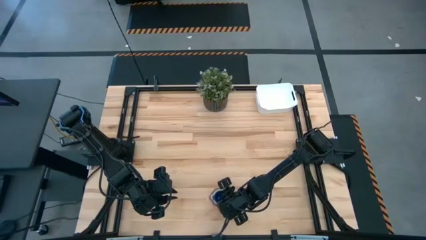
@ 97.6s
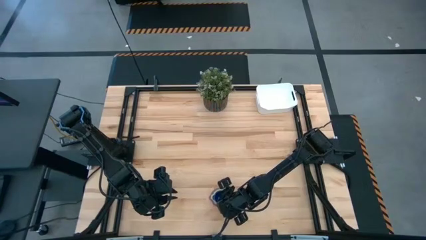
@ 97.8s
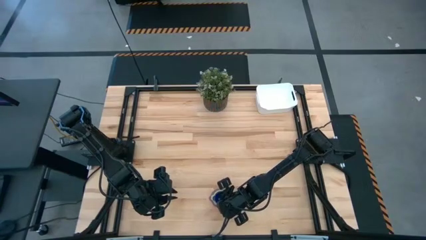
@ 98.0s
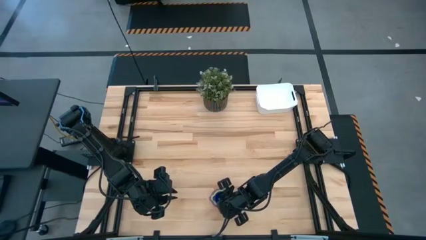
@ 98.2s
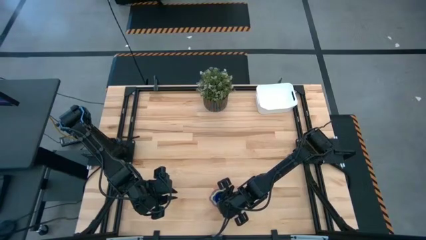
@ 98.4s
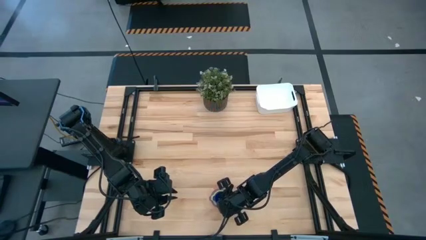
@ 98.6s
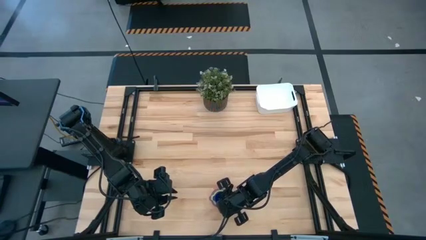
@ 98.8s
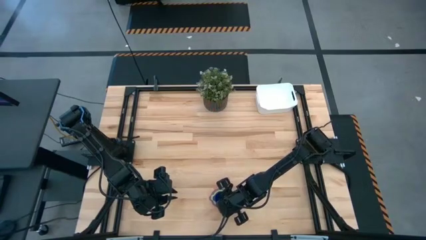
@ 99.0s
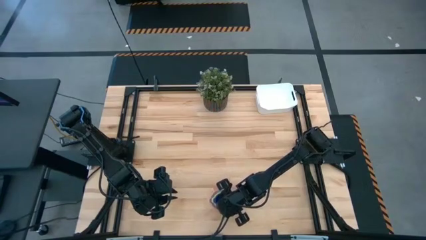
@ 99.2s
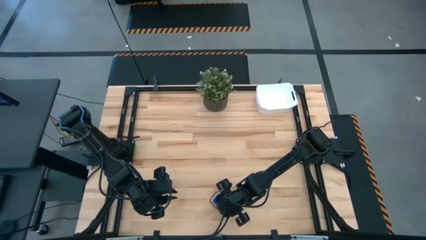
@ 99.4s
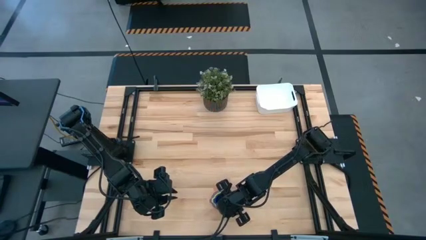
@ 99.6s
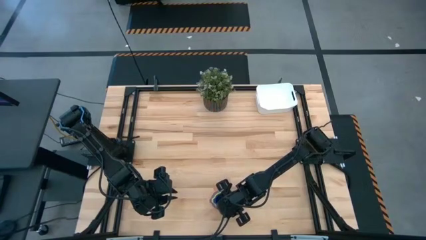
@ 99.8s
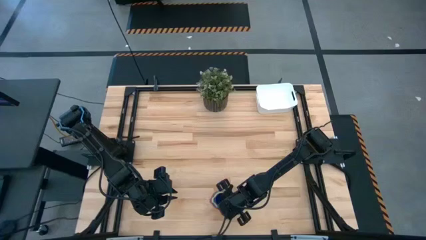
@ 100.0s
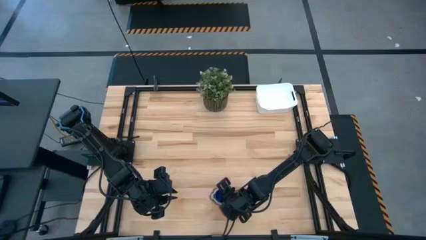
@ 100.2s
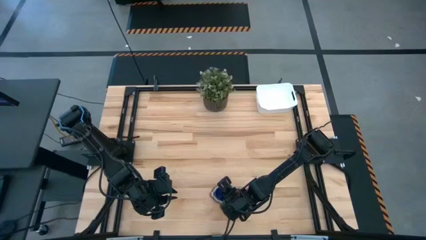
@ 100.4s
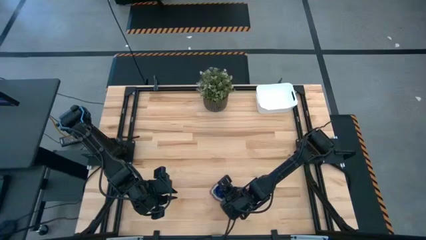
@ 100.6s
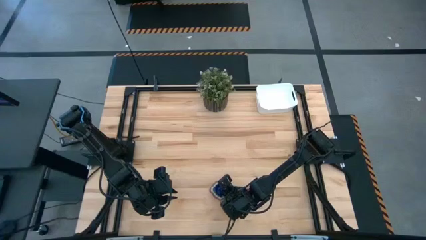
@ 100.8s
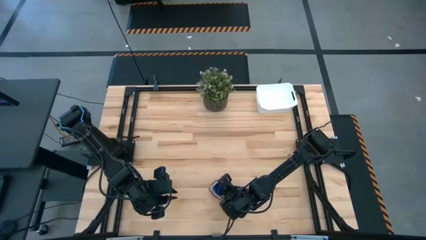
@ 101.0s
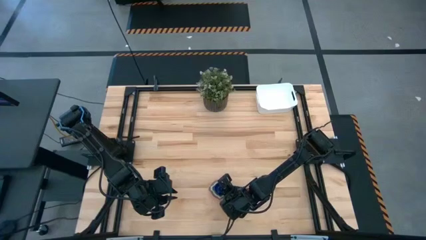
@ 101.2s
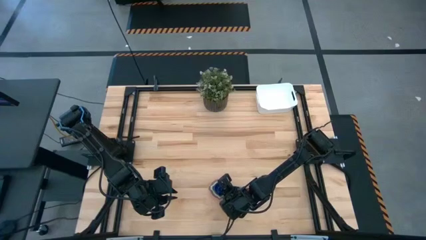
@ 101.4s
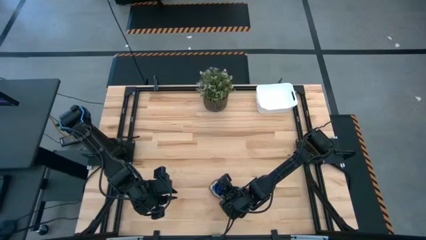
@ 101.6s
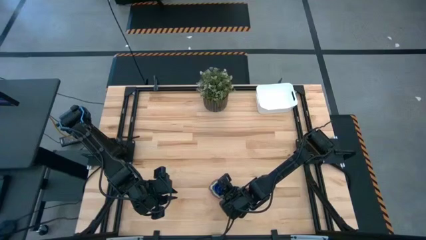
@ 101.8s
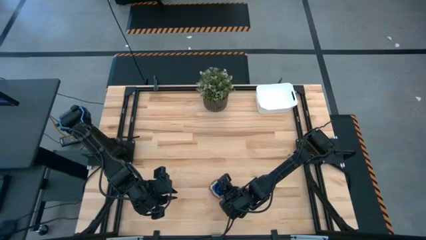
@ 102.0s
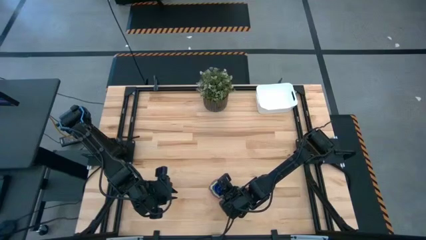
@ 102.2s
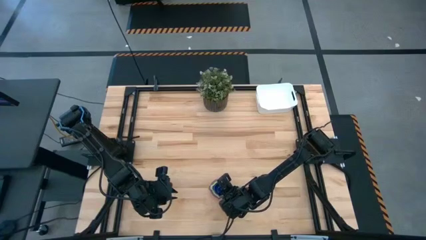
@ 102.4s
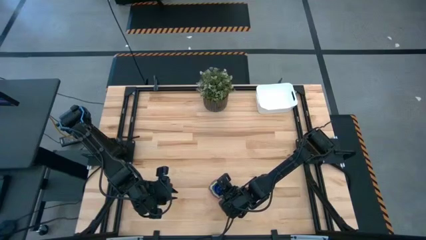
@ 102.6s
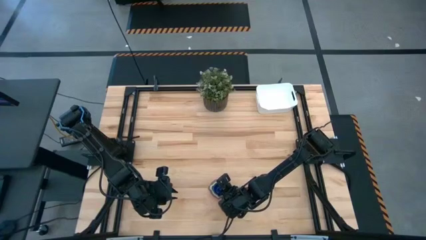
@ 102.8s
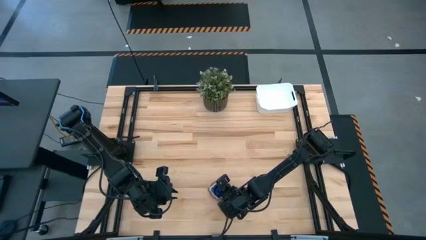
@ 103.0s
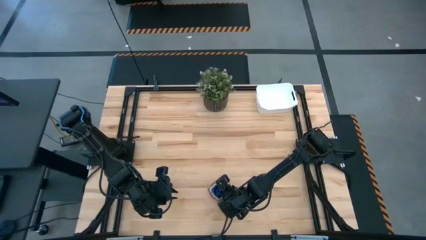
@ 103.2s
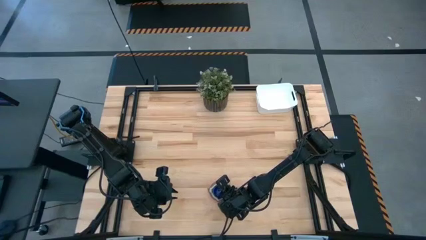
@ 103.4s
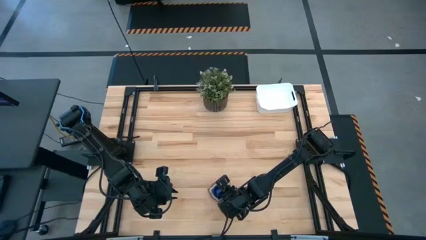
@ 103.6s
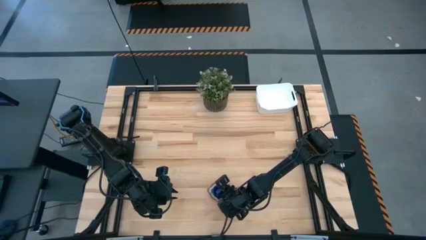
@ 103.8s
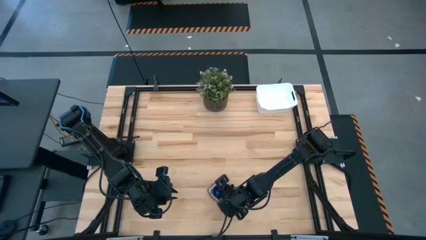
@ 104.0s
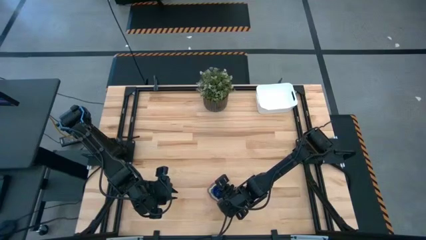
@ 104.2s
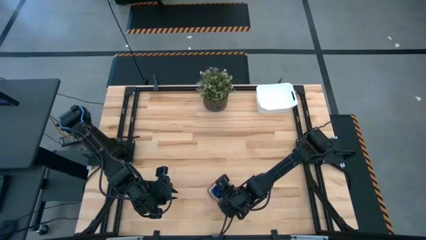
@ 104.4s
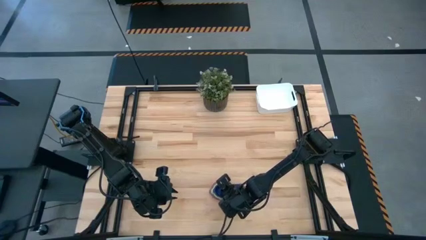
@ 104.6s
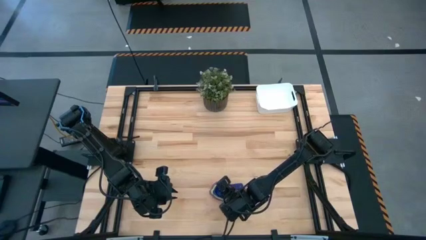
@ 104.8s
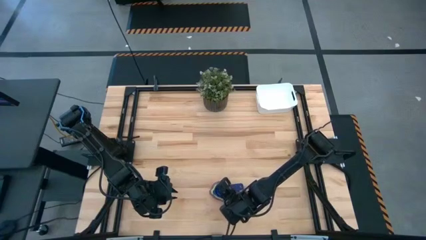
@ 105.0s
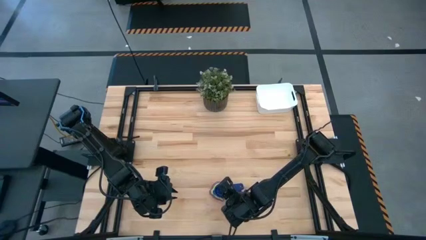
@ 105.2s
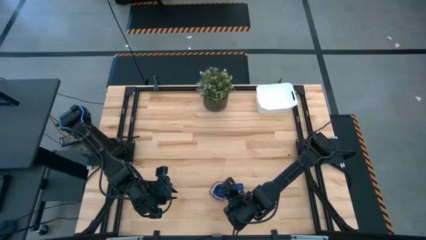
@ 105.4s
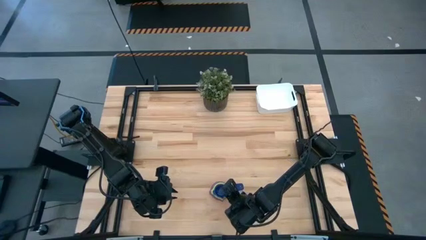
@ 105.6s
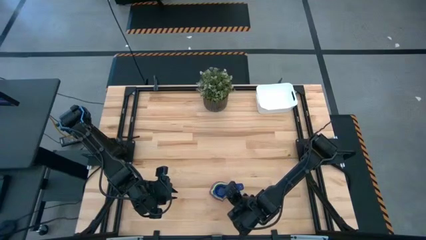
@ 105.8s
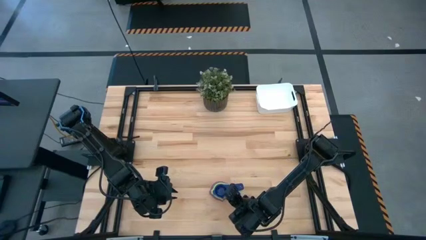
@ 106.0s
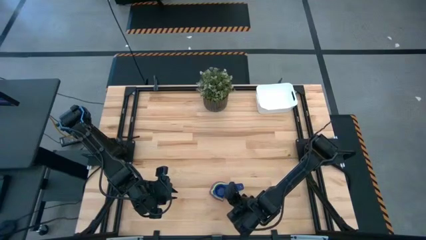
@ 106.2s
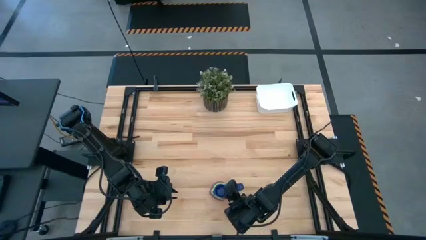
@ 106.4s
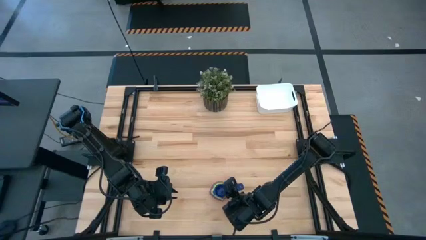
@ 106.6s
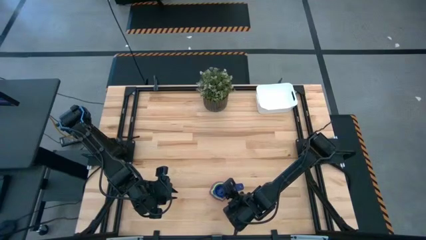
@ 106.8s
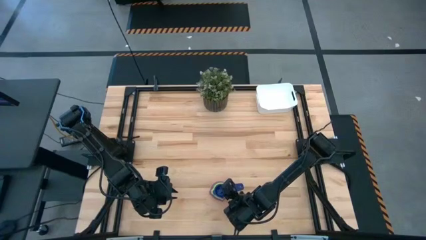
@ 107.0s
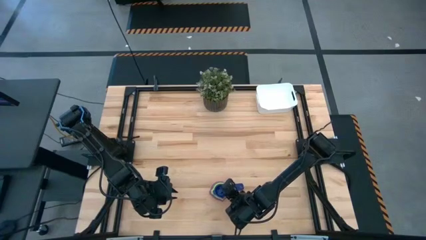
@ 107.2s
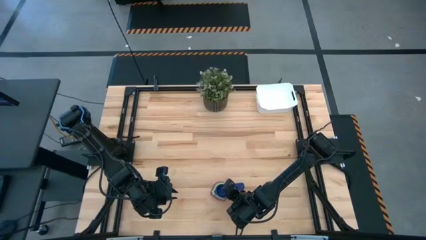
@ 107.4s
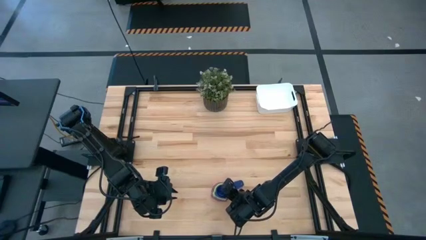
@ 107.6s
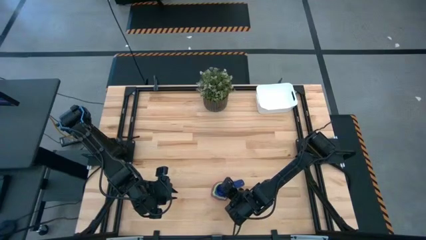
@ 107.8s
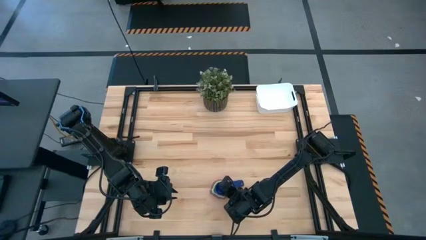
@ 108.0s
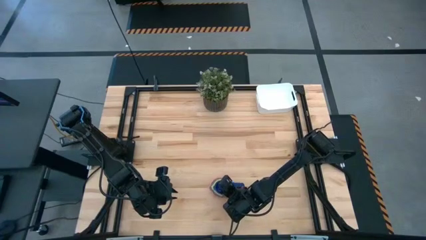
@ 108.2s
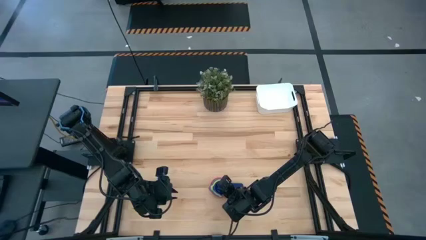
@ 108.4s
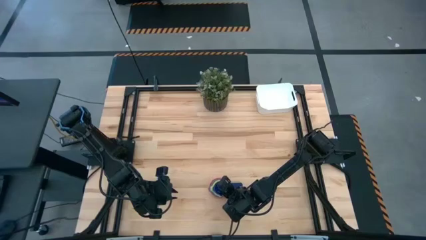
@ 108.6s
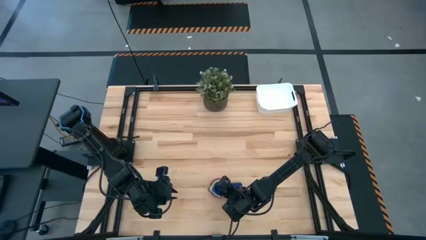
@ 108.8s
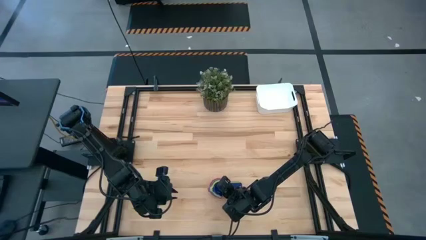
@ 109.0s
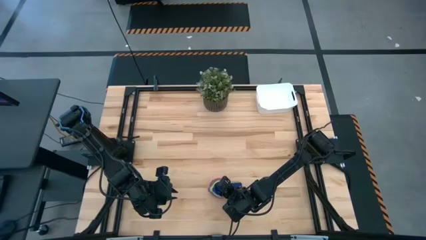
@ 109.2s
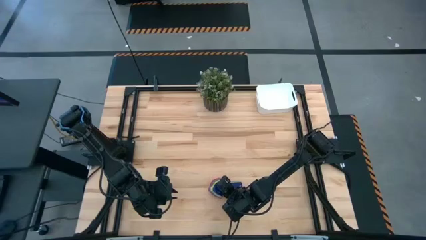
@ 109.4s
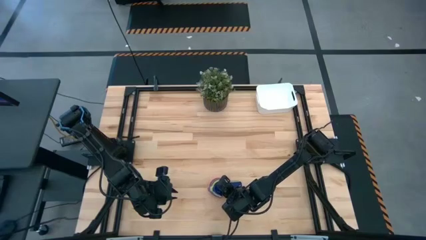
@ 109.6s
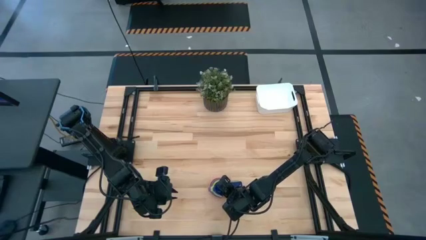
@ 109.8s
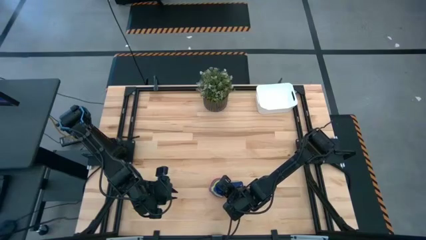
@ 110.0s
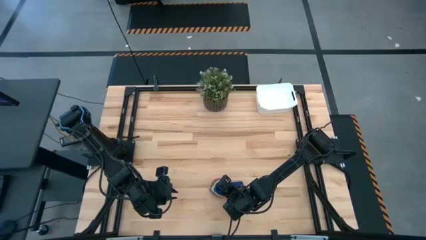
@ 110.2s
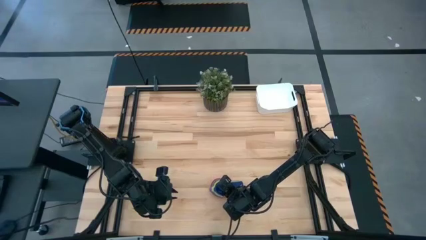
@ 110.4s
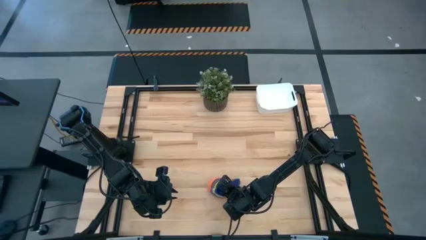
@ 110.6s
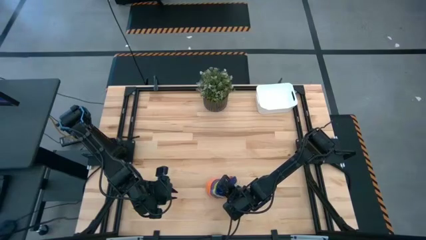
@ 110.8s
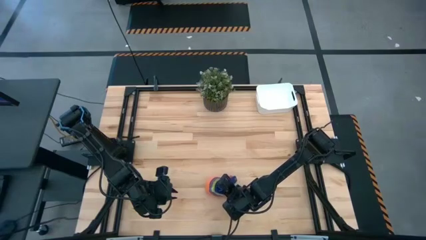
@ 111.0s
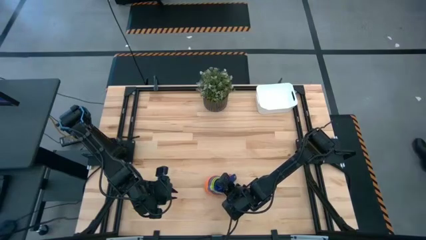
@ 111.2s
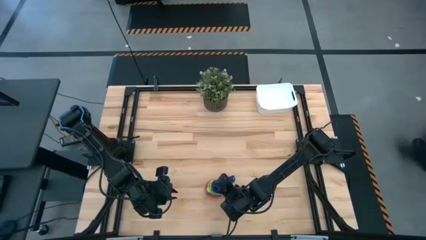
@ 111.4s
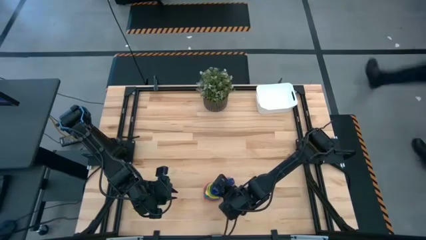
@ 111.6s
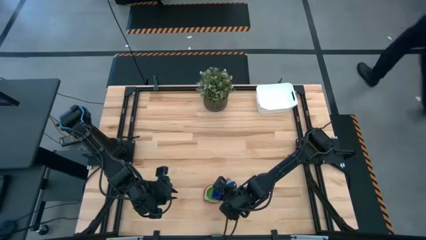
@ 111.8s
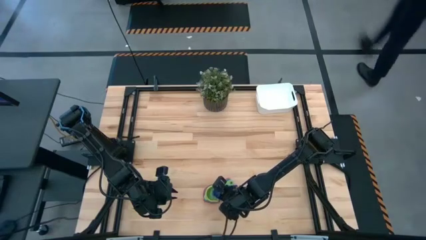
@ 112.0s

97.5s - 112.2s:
Task: Nest measuring cups in basket
Put the stacked measuring cups into the white bin
